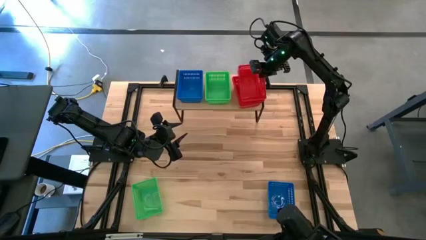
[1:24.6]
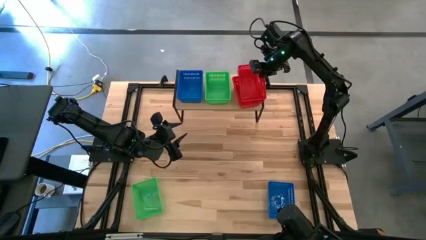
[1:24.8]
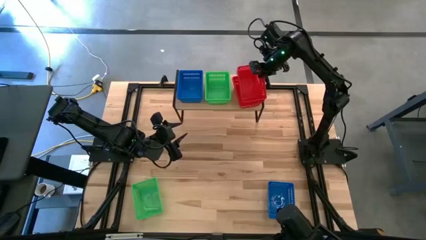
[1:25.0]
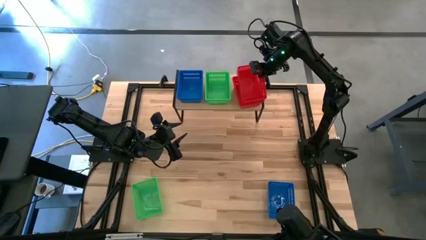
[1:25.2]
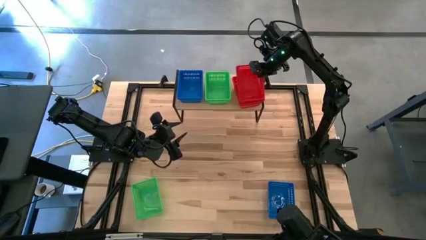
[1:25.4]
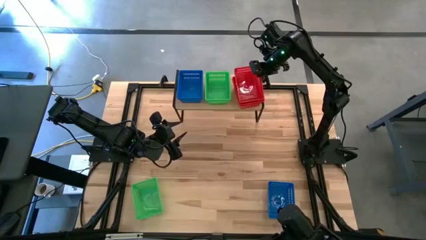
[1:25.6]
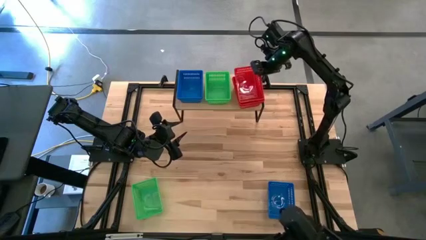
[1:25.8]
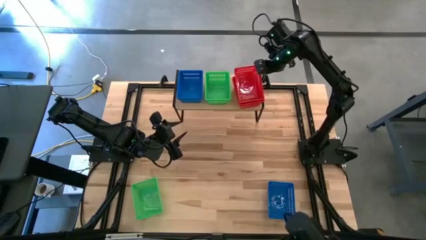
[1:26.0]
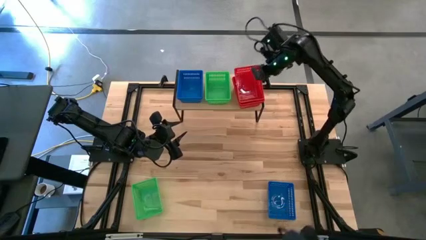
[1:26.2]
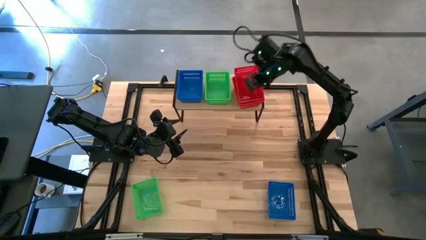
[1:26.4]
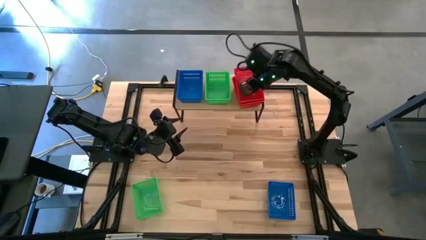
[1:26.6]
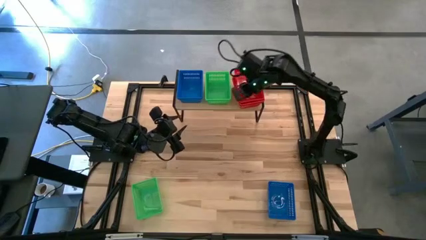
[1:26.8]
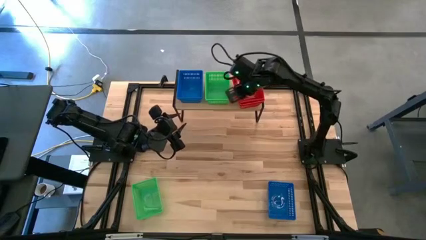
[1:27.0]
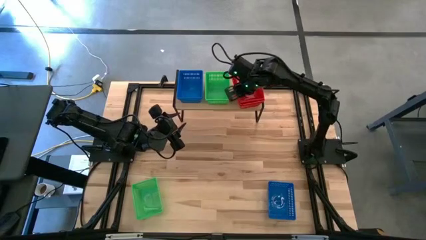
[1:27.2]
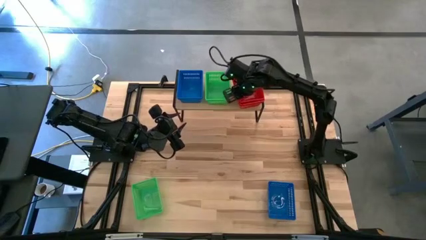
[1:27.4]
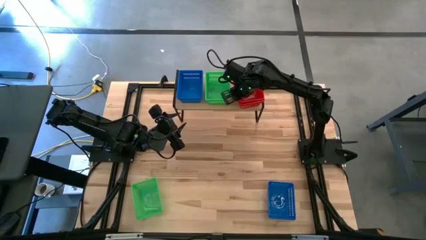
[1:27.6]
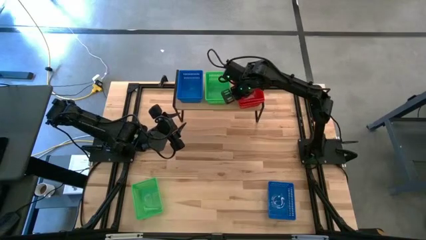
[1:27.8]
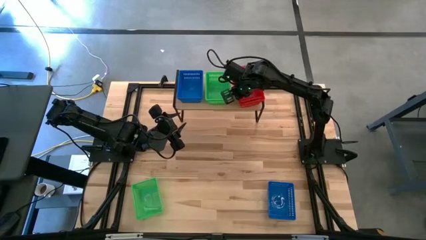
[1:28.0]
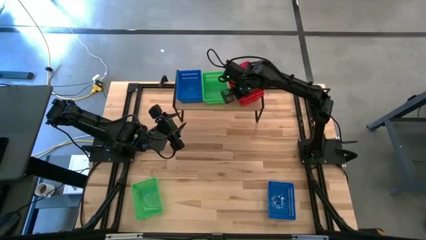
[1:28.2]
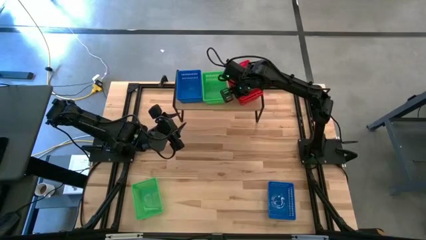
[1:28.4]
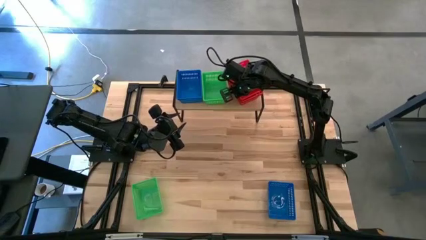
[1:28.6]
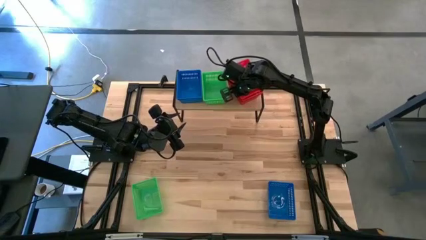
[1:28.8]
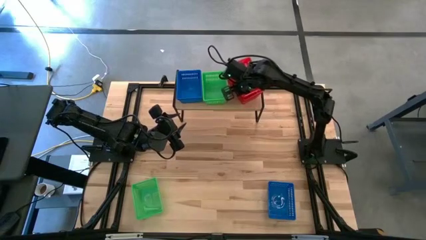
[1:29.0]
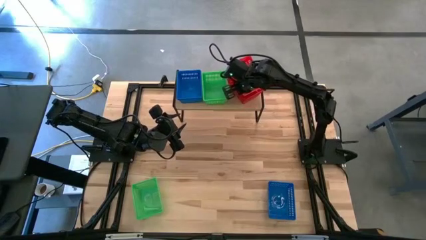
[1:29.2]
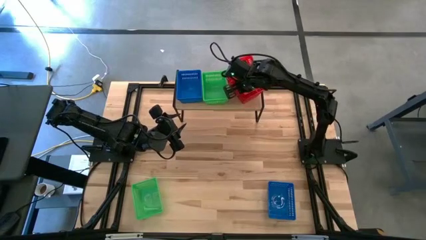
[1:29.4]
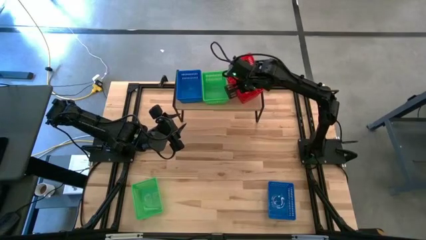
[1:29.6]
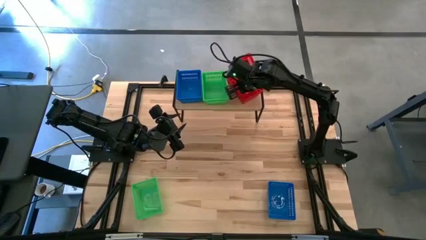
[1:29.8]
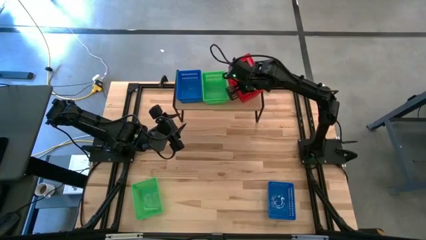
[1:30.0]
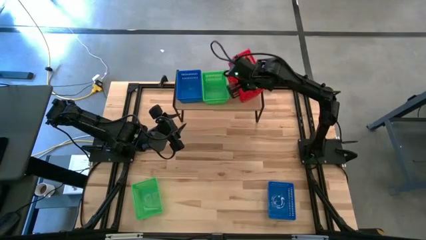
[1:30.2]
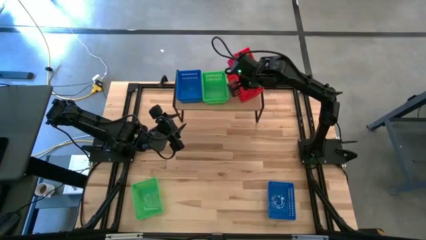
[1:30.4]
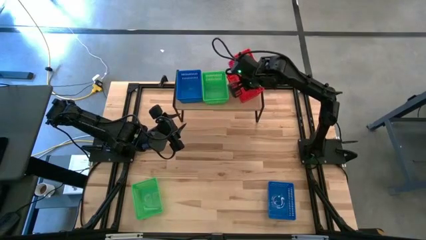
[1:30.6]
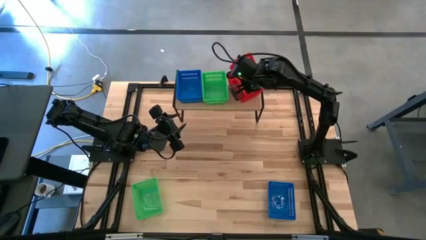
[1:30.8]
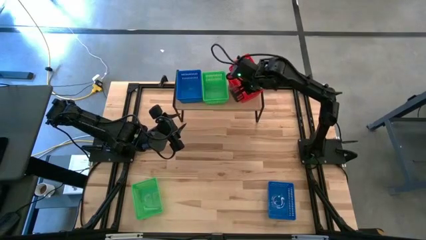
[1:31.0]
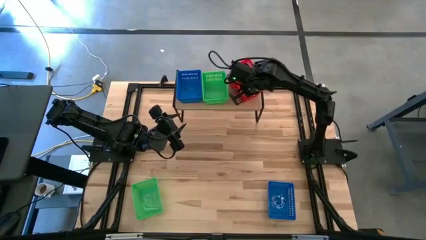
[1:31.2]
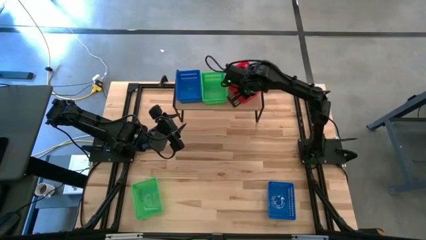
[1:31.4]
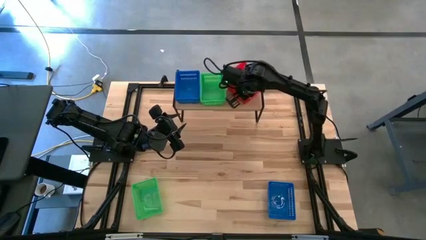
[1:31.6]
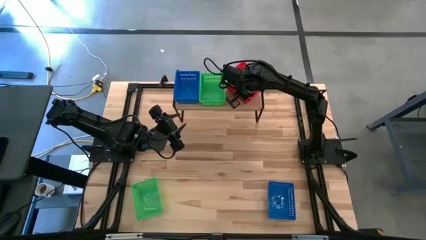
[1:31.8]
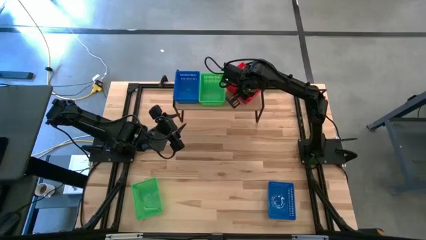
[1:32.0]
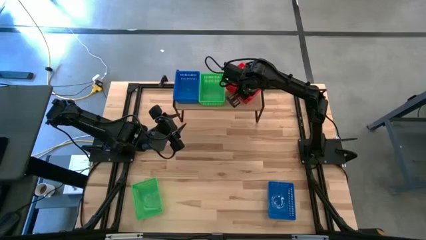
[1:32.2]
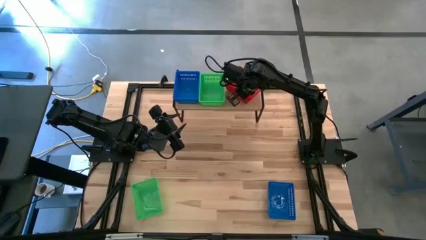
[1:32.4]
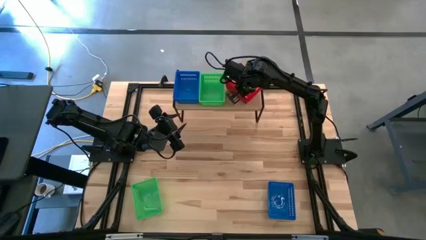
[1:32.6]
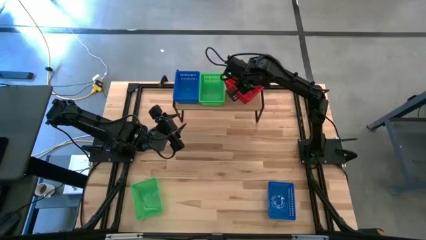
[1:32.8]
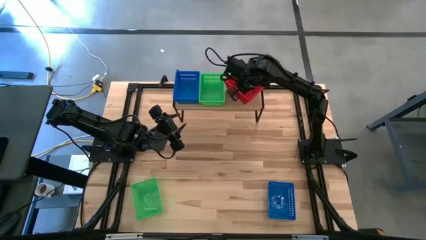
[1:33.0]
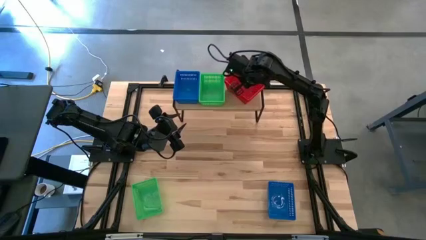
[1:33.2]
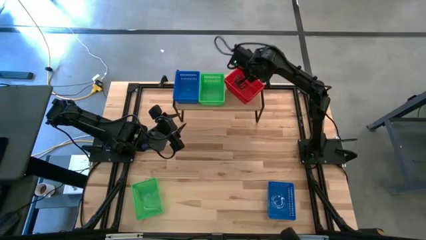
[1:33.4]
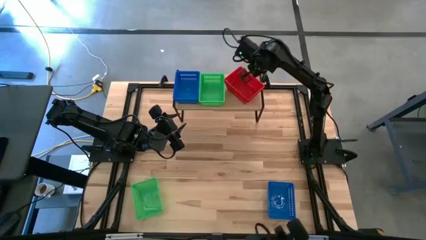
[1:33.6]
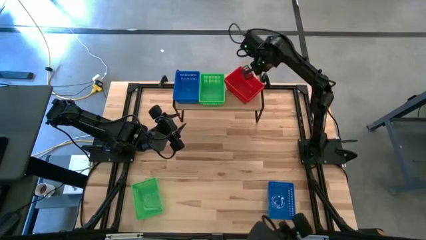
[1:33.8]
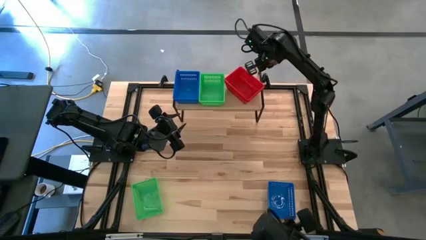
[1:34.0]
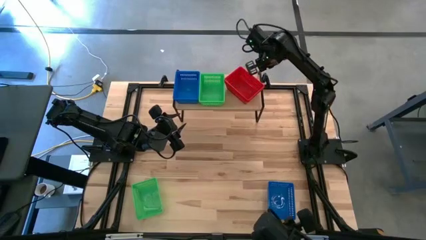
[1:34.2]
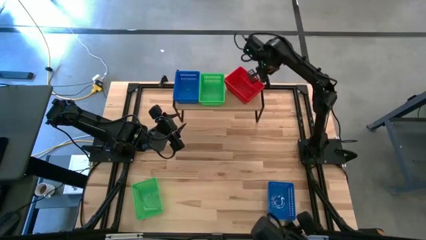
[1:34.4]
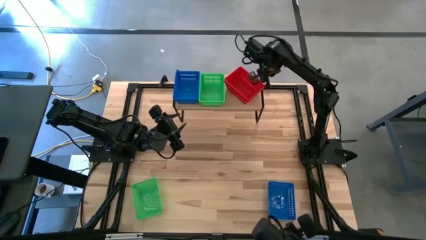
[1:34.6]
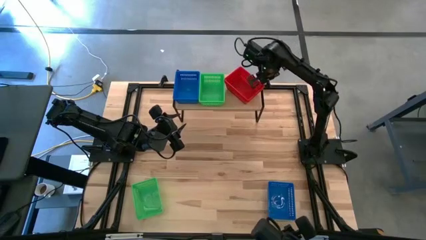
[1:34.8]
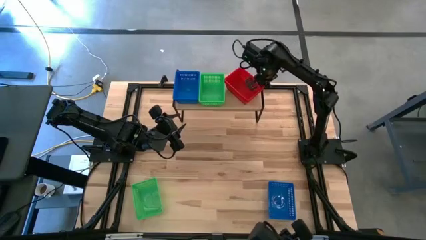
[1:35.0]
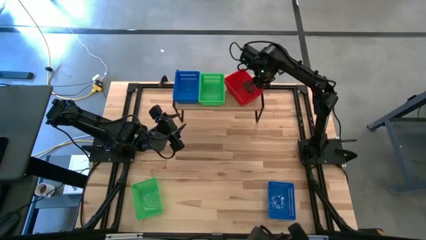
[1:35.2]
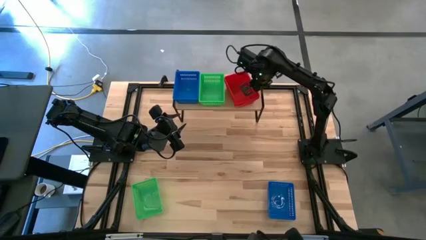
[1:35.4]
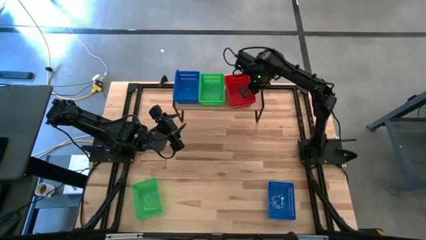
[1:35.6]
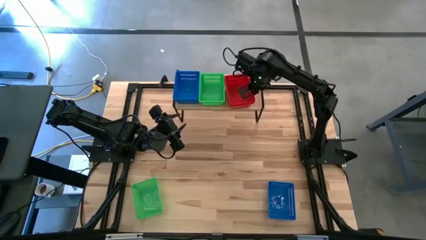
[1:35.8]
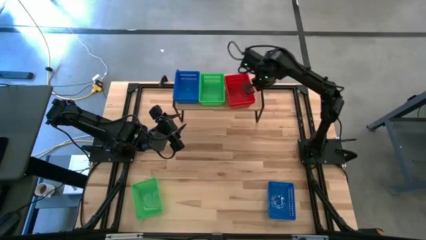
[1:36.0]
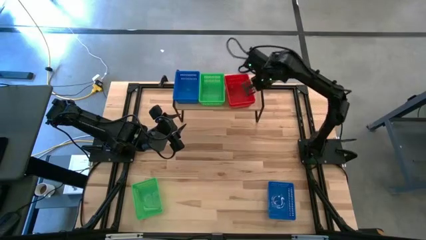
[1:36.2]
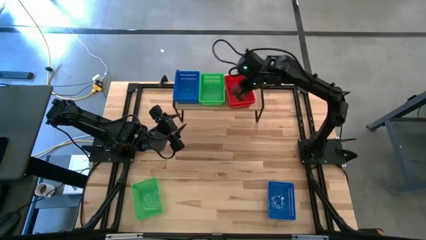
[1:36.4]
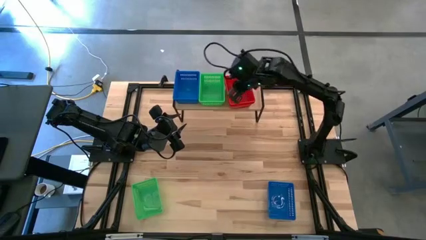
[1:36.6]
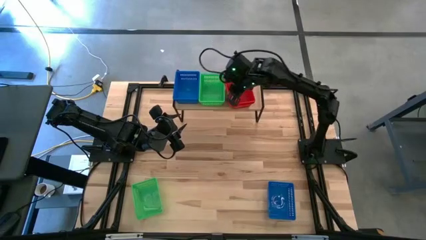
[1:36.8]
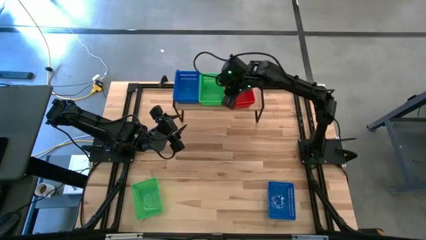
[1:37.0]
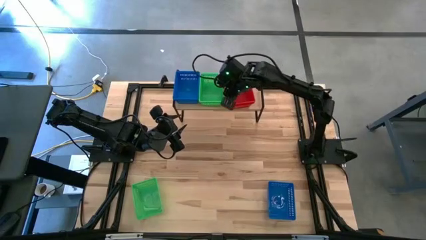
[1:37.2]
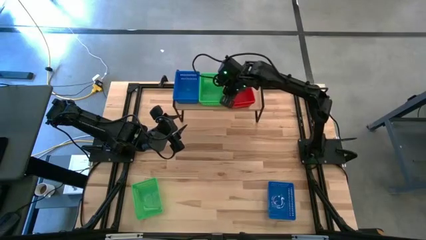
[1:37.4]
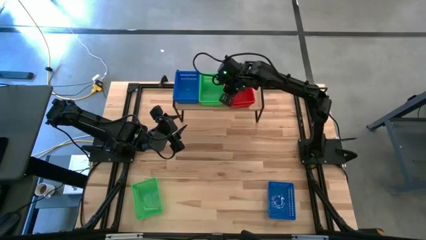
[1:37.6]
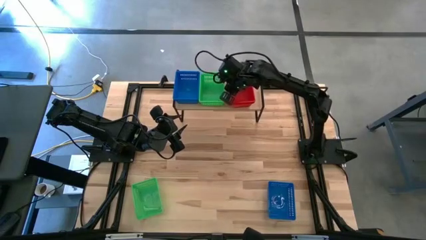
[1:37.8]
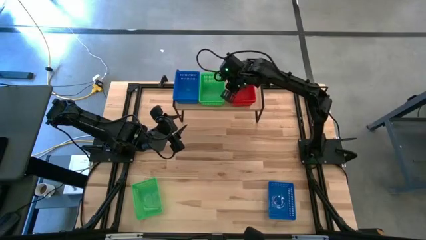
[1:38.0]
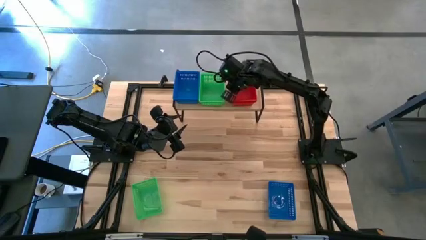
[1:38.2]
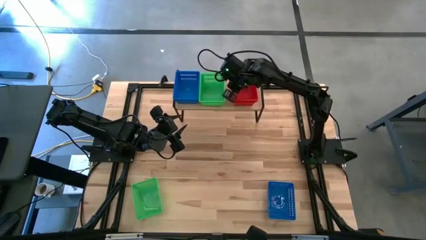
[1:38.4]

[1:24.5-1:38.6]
Task: Stack baskets on shelf by color
Stack the red bin on top of the red bin on the shelf

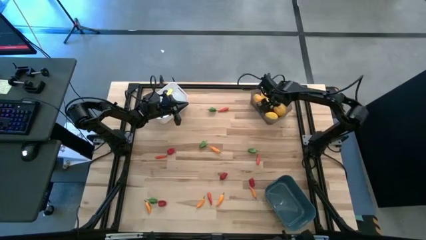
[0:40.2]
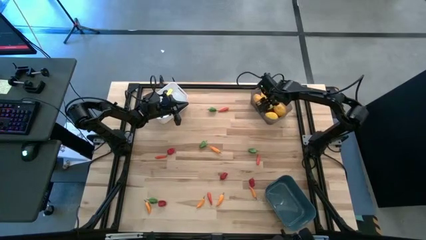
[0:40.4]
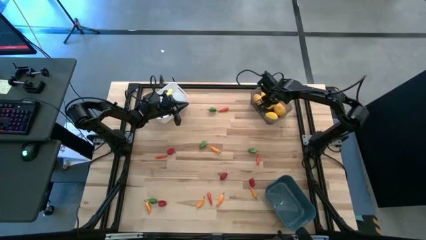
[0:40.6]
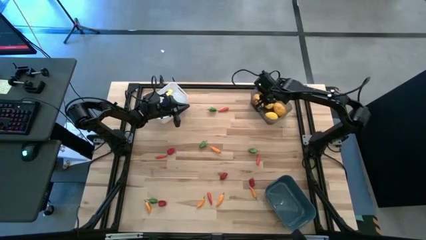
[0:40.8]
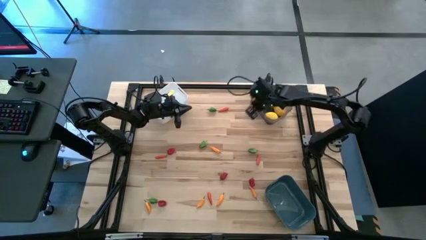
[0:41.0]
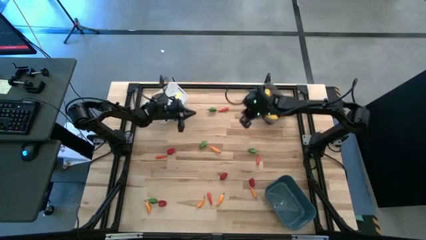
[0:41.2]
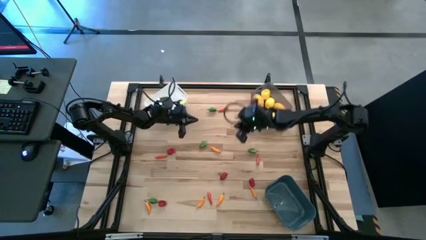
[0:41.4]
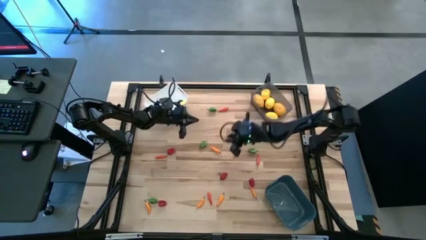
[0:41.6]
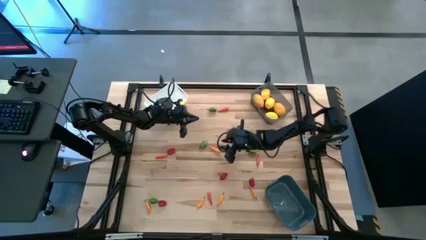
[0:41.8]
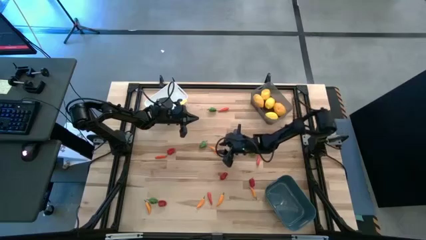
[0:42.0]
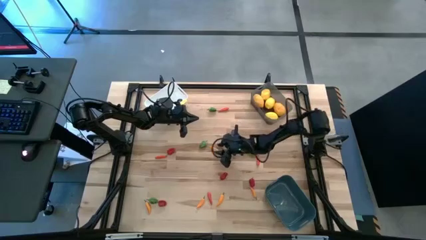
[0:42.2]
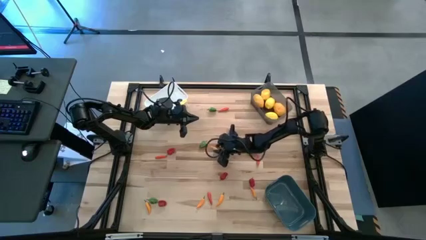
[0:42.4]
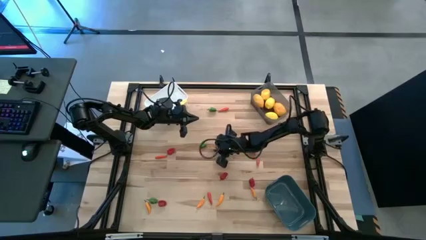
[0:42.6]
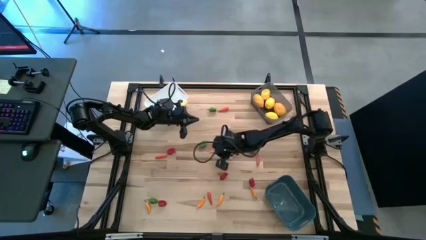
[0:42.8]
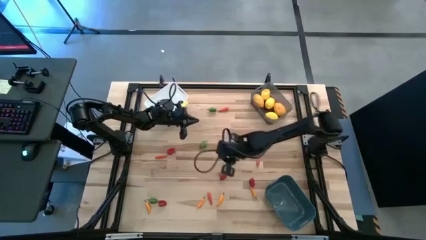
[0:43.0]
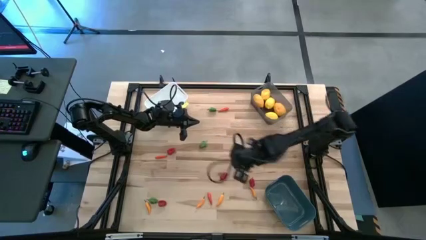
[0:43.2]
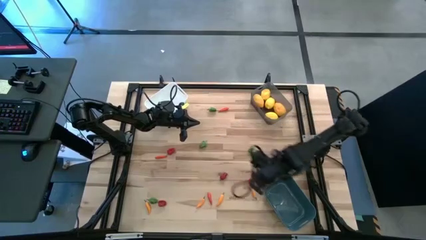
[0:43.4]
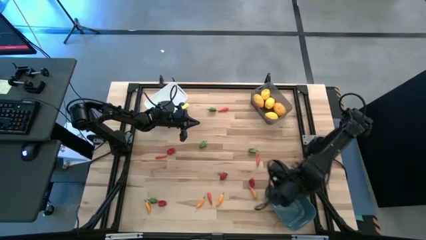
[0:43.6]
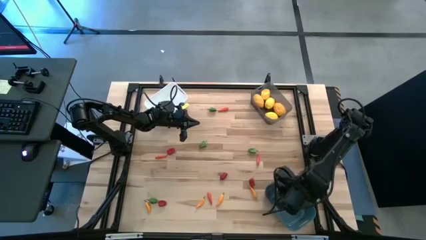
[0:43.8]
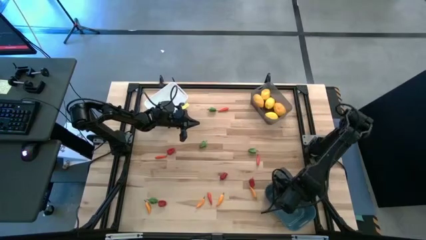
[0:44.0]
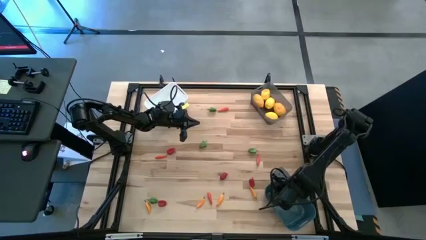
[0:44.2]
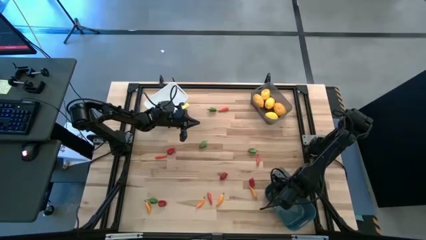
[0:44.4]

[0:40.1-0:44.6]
Task: Sort produce into baskets
Put the yellow chili pepper into the blue bin
